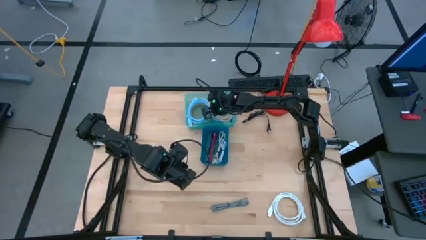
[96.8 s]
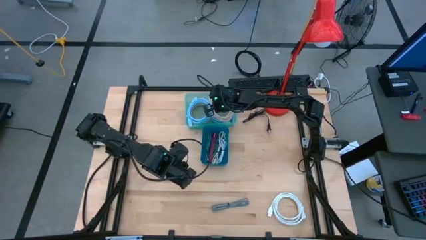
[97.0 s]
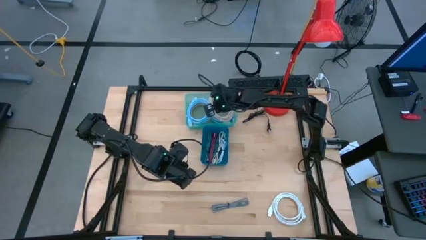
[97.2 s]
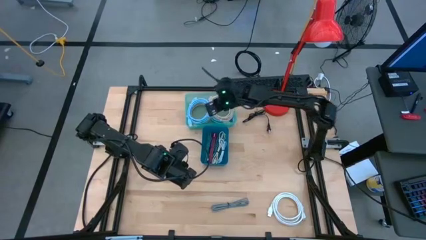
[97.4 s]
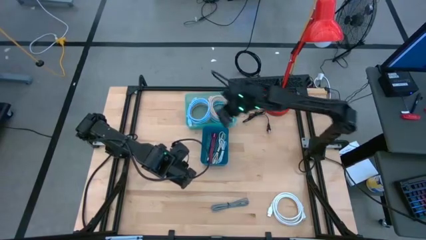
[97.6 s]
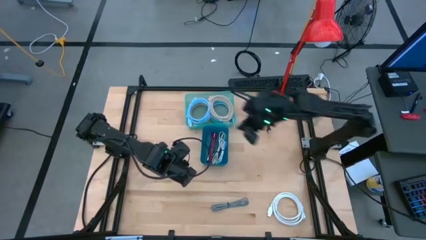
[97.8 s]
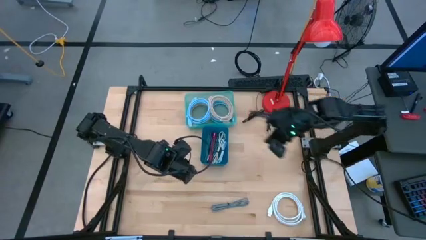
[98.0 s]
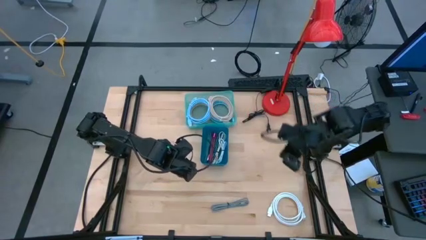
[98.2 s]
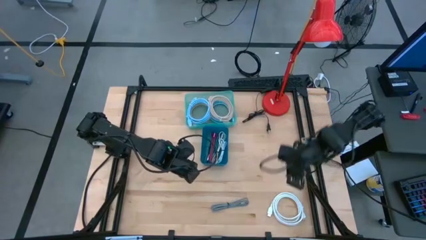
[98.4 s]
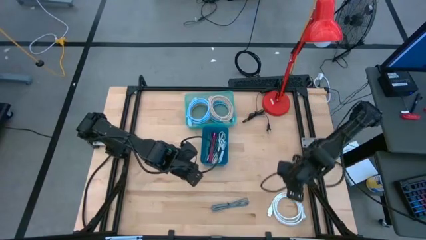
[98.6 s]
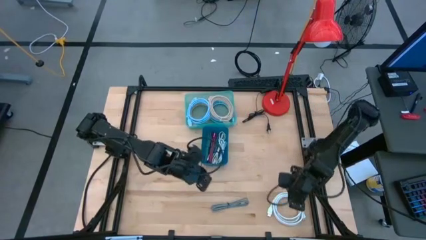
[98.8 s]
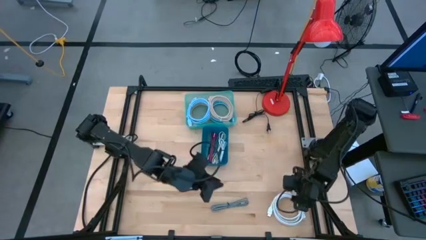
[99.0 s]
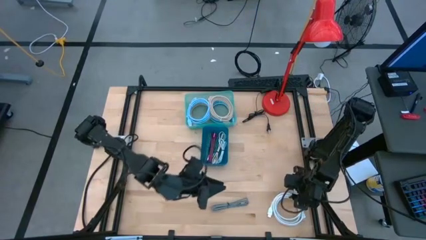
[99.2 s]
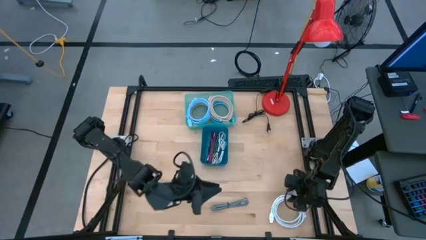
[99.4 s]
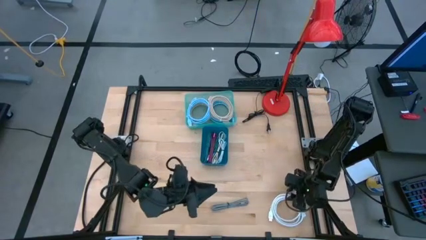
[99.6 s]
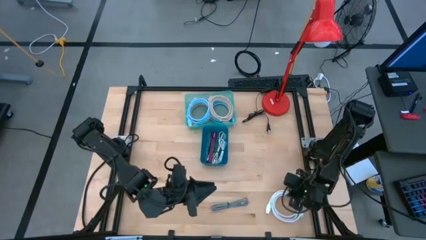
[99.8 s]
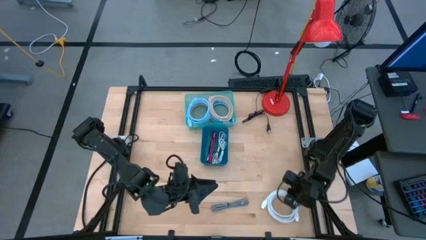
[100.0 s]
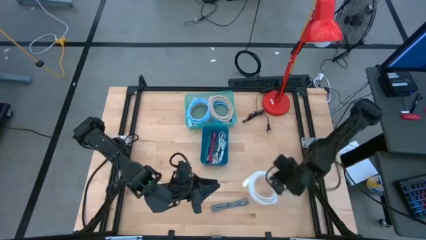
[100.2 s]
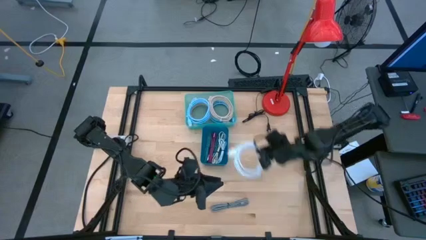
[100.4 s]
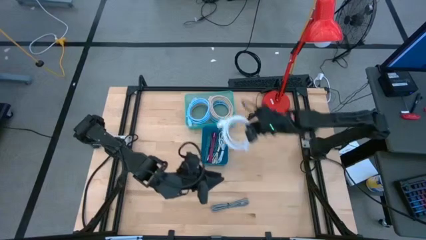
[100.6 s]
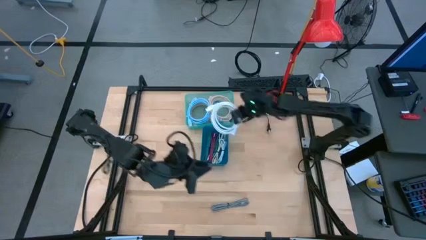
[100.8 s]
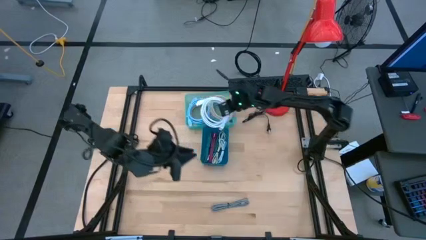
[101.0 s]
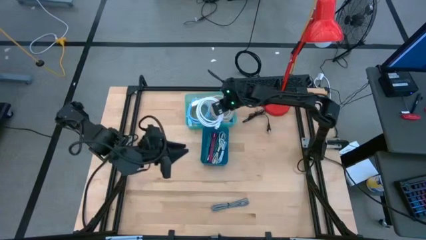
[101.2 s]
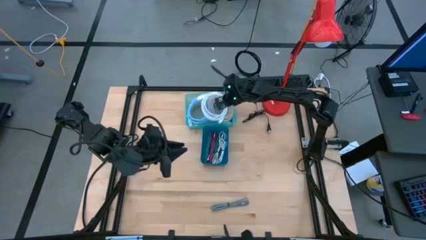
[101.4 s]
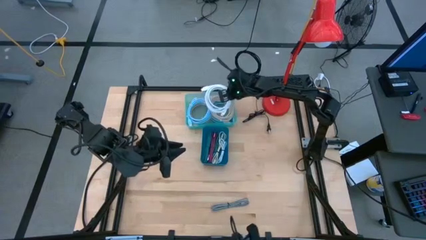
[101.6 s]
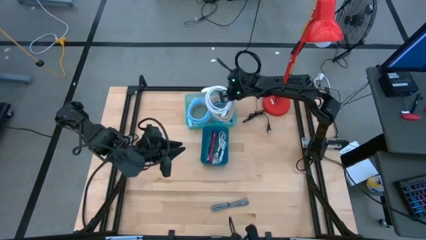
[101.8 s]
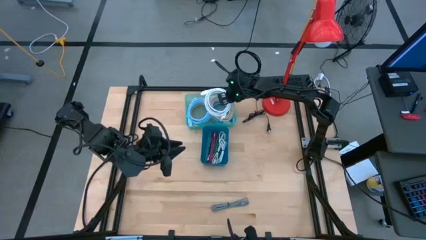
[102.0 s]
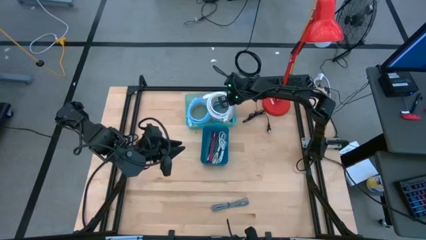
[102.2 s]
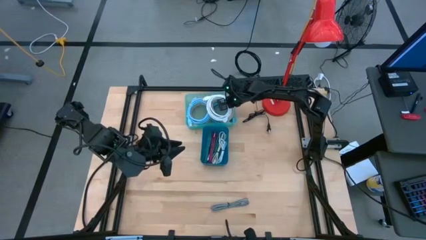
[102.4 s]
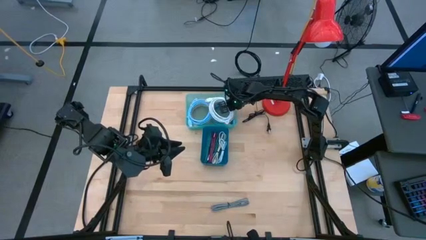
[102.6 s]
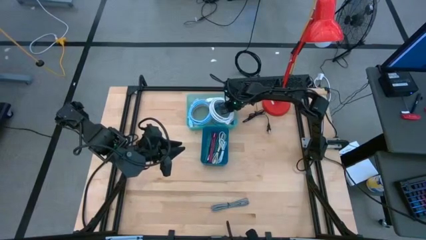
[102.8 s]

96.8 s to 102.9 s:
Task: Pick & Place USB Port
Put the white hdmi cable into the green bin

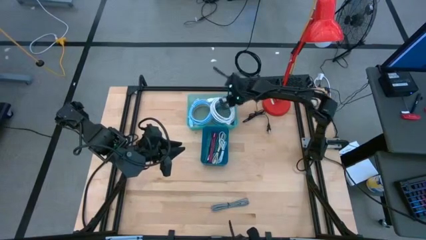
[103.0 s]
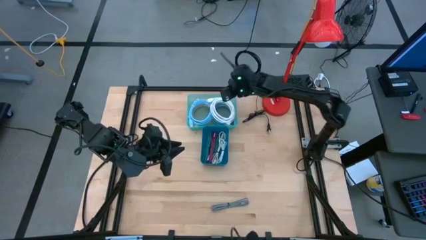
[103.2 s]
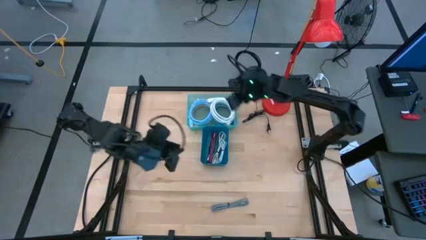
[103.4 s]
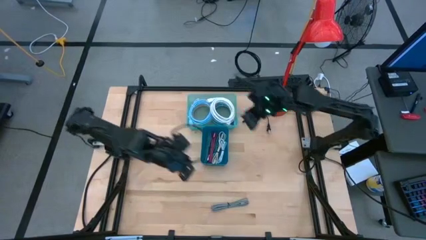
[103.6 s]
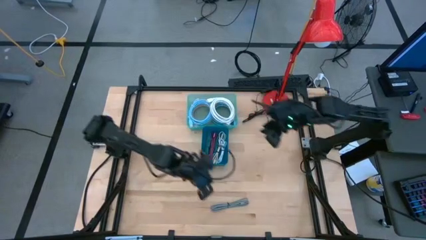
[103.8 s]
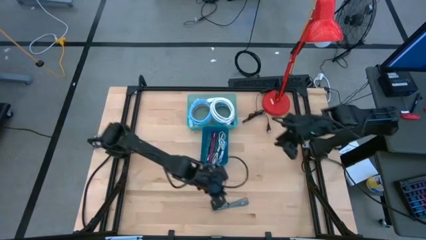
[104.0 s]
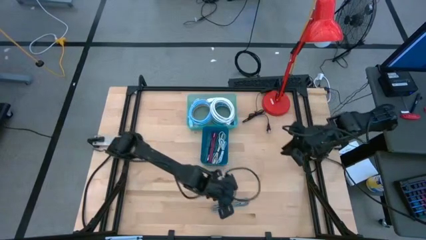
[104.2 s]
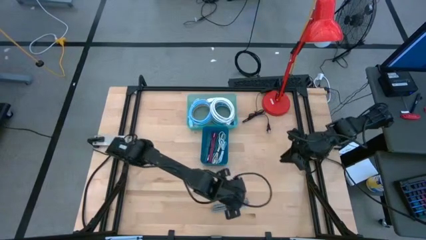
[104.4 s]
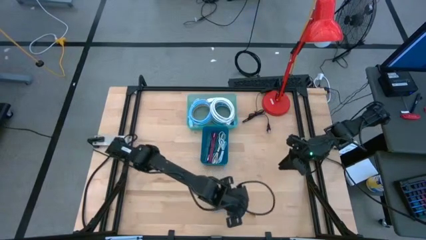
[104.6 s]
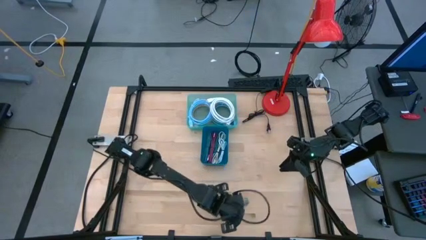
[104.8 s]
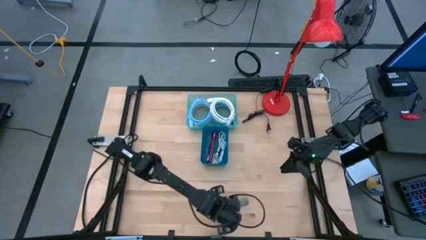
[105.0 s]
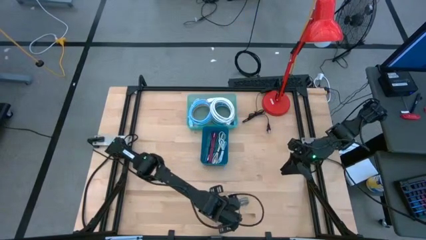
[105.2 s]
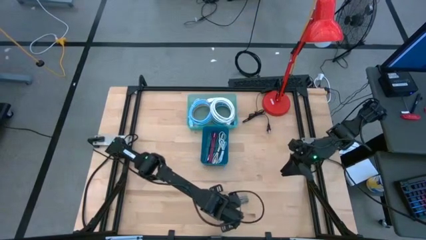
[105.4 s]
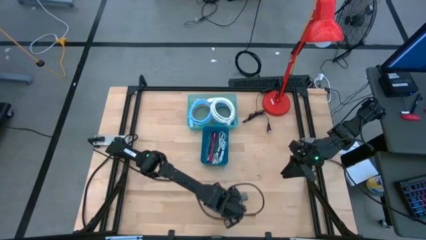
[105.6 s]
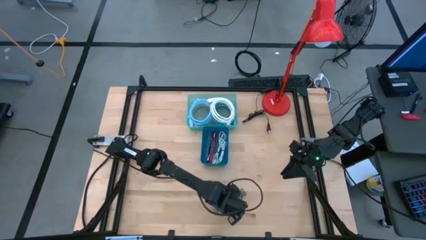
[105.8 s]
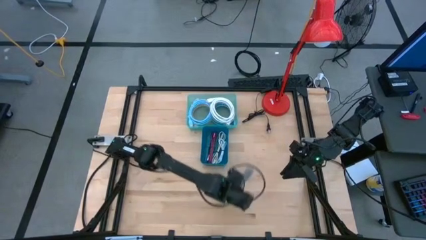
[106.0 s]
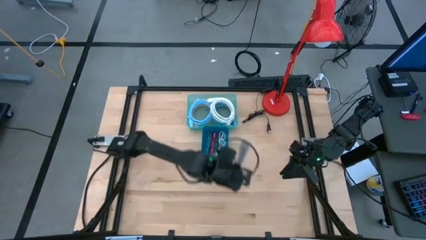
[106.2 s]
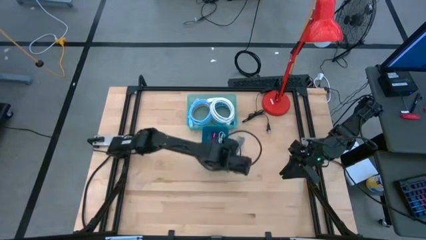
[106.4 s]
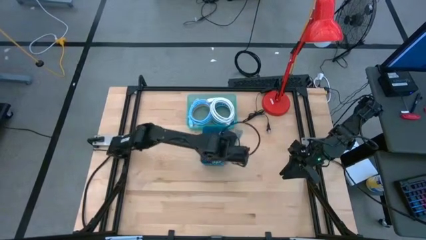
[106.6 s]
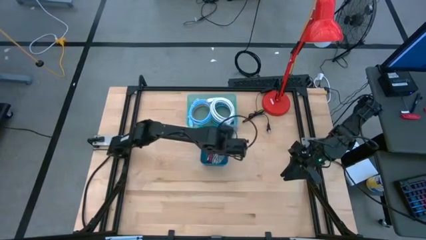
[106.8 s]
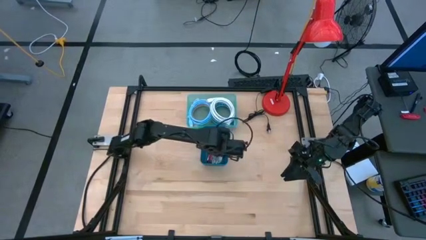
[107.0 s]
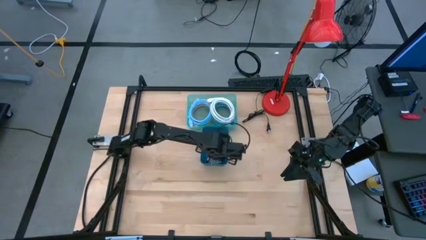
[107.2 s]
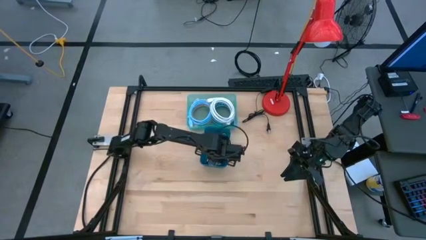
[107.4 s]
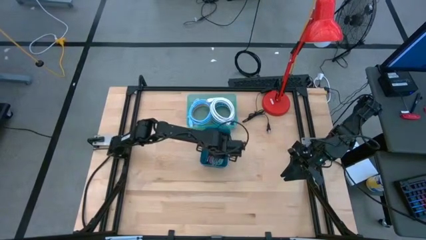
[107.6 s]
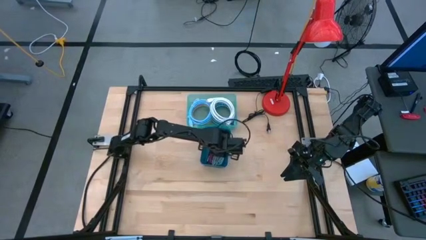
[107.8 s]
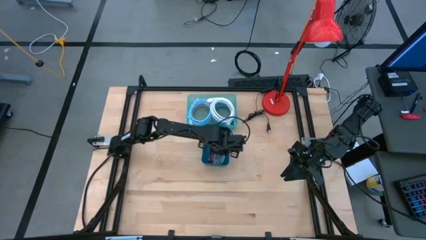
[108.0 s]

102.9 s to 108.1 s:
Put the black usb cable into the blue bin

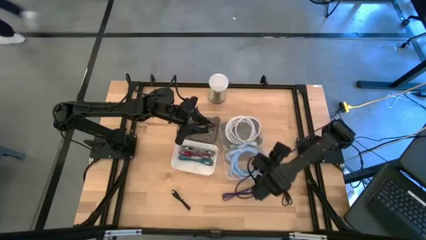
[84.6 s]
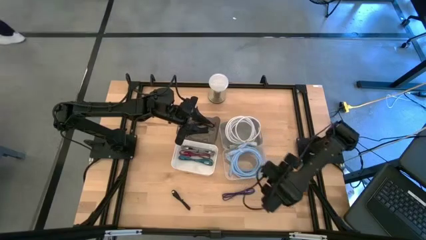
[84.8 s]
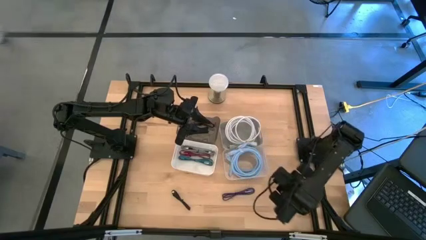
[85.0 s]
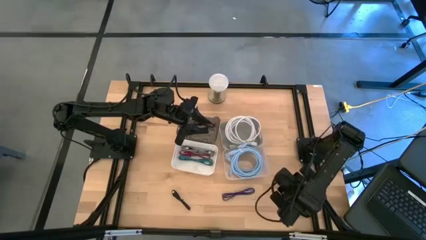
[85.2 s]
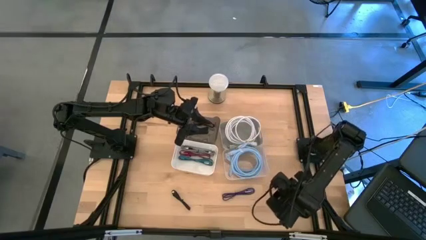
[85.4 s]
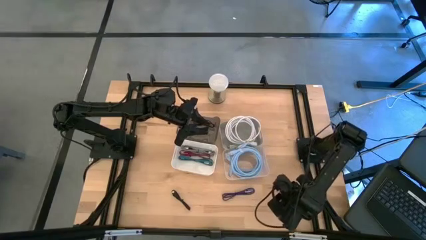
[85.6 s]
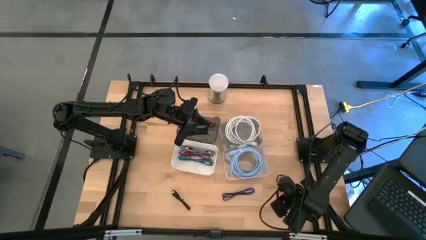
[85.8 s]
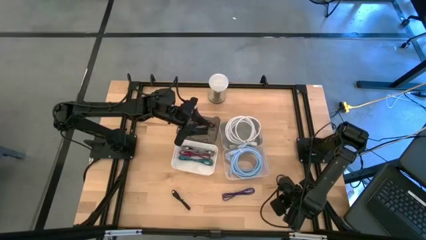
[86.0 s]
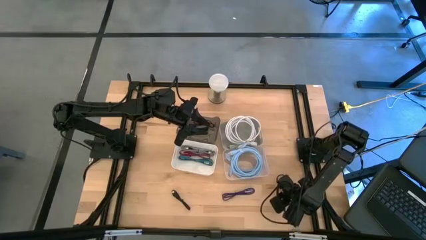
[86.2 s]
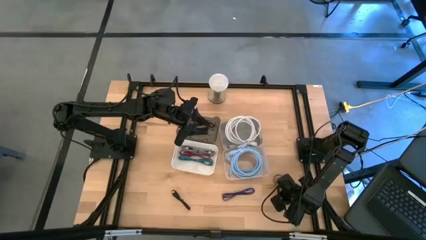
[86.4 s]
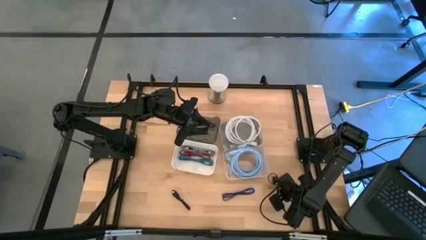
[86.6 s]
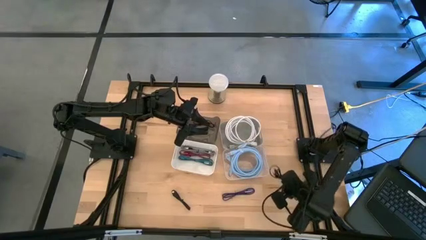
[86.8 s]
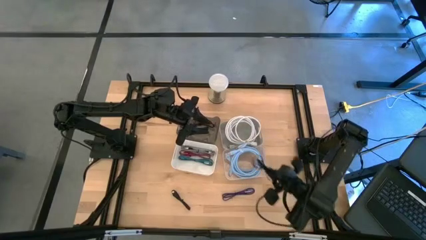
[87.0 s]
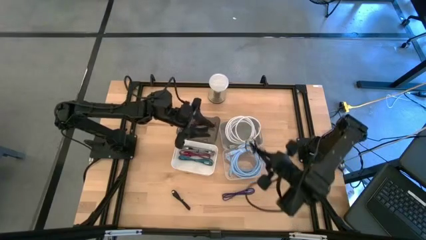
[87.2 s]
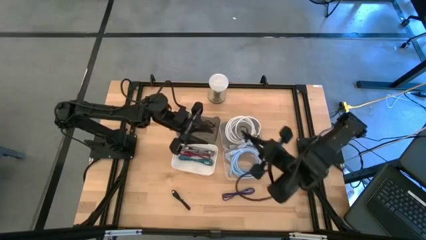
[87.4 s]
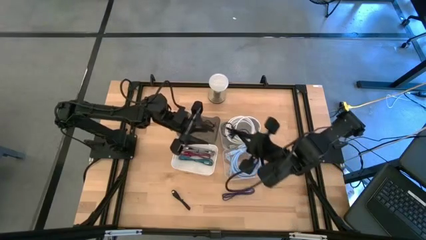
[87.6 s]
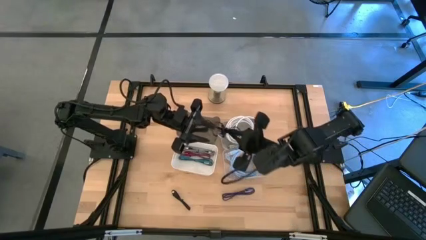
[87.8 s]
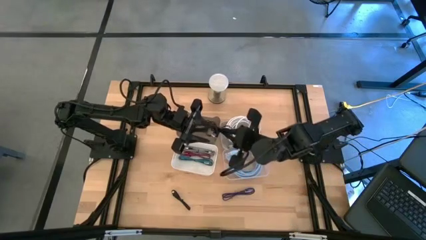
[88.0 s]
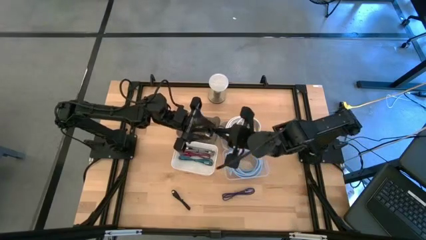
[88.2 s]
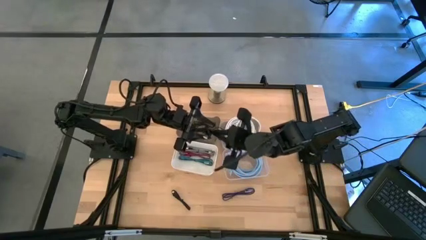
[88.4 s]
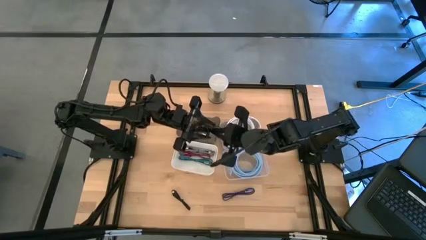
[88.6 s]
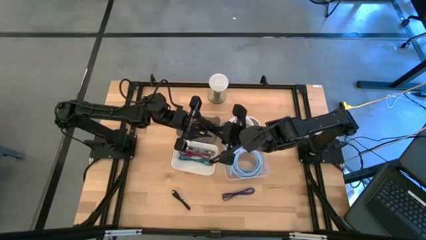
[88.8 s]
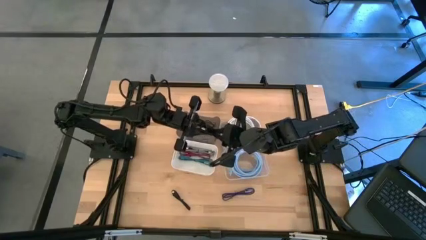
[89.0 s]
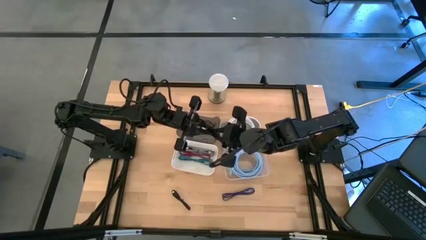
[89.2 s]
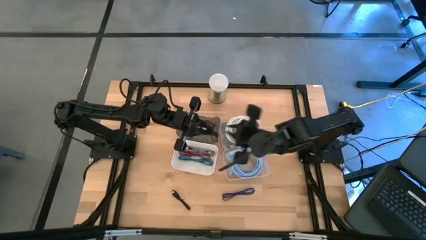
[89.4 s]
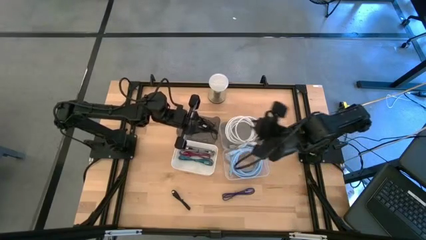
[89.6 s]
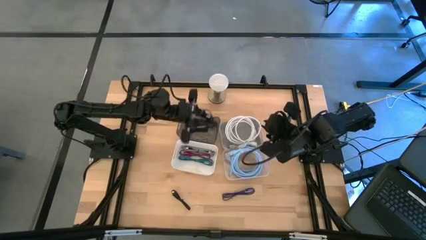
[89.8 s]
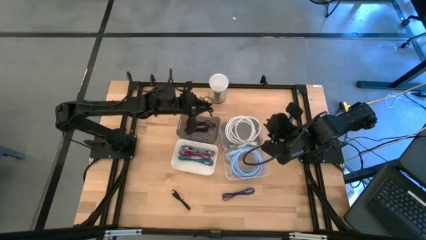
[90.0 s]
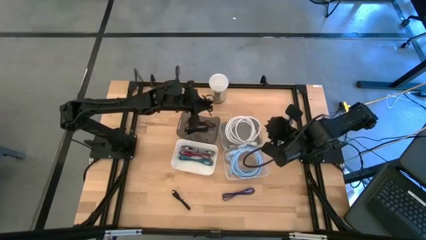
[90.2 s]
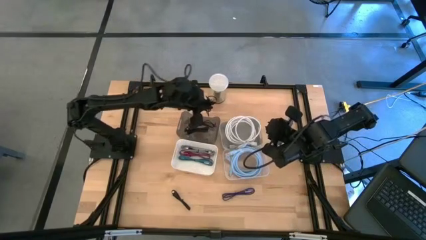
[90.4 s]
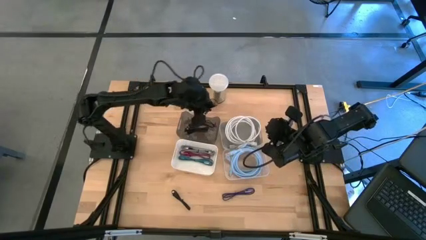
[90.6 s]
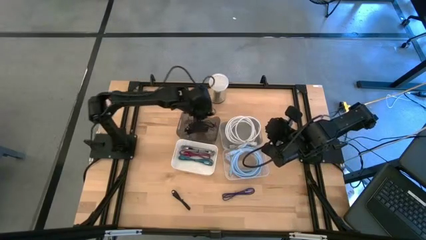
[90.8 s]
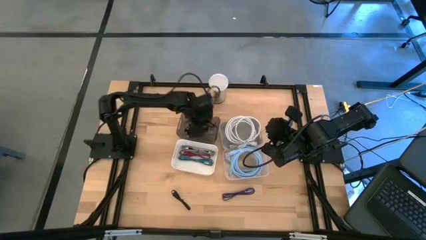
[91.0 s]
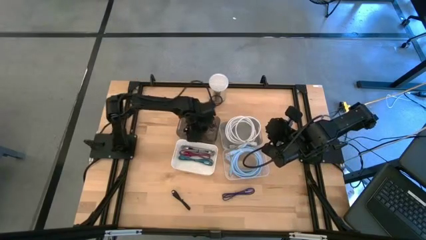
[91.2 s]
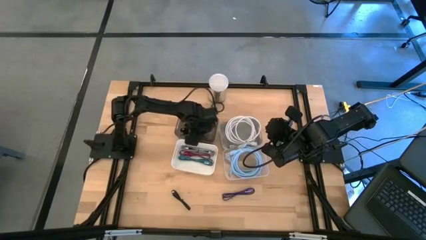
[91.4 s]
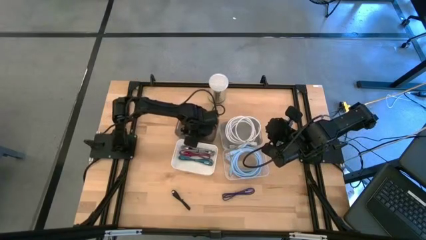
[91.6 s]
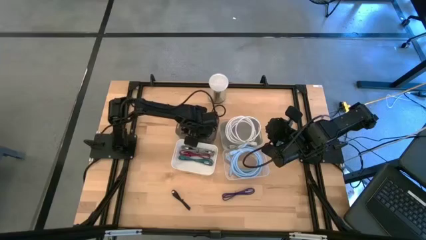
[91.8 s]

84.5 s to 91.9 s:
Task: Pick & Place USB Port
Put the right black charger cable into the black bin
